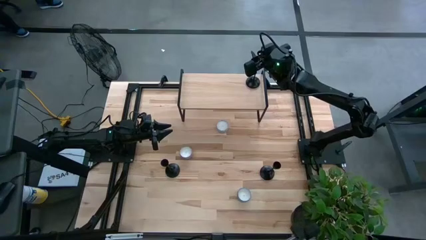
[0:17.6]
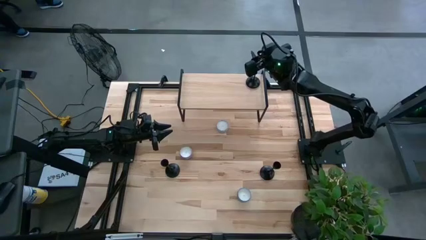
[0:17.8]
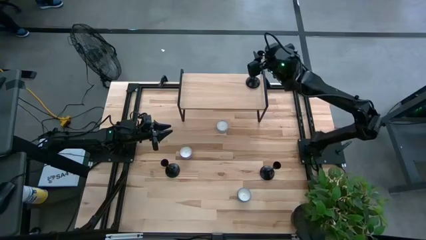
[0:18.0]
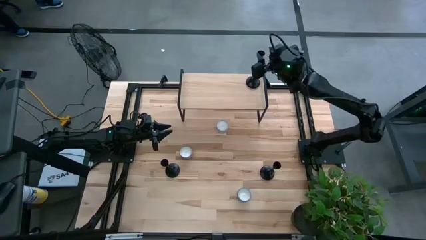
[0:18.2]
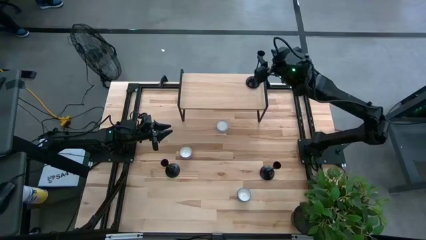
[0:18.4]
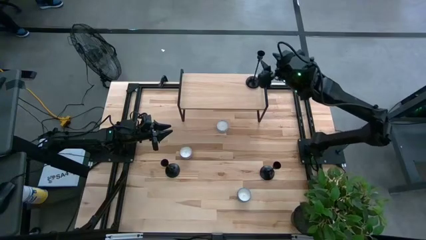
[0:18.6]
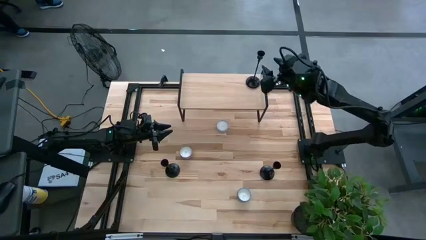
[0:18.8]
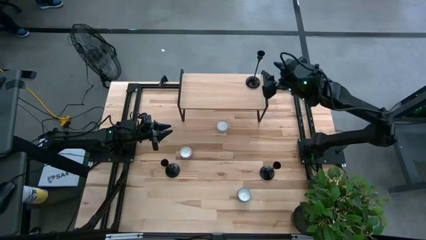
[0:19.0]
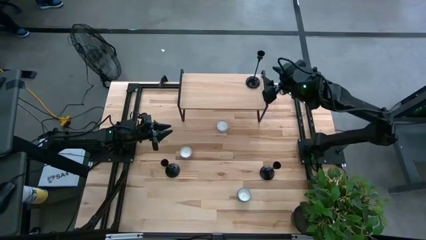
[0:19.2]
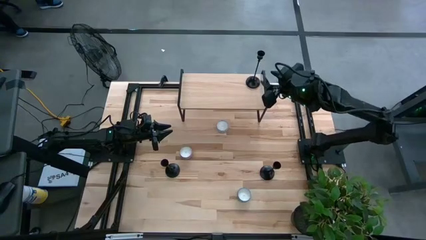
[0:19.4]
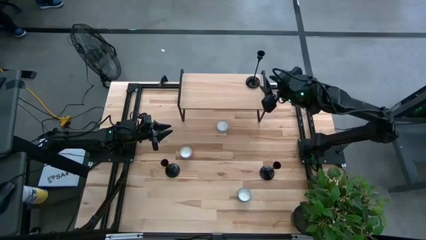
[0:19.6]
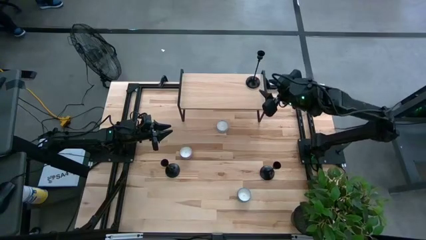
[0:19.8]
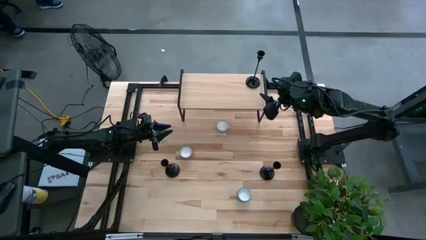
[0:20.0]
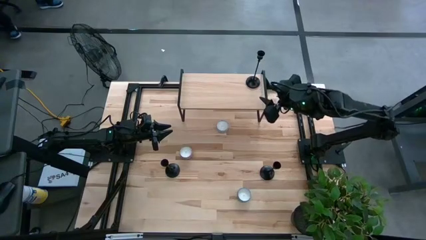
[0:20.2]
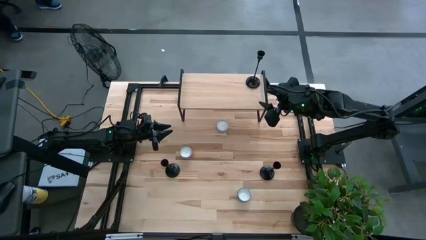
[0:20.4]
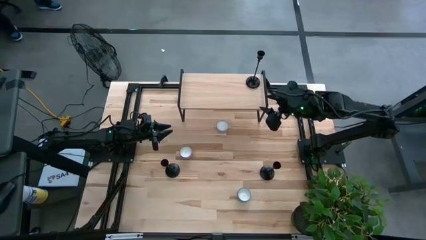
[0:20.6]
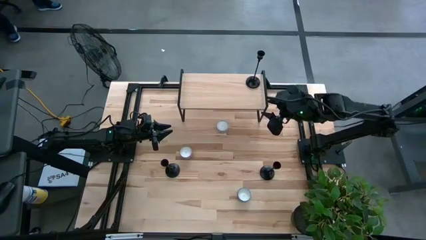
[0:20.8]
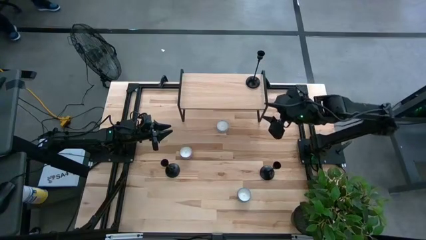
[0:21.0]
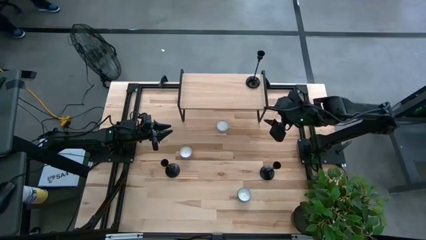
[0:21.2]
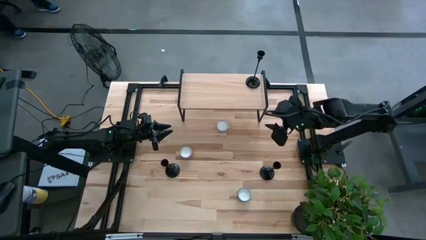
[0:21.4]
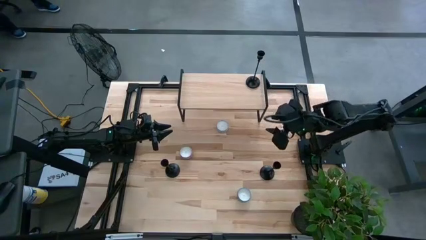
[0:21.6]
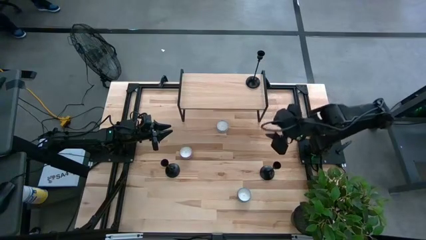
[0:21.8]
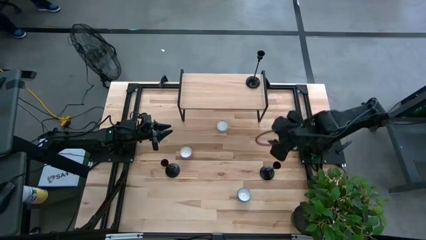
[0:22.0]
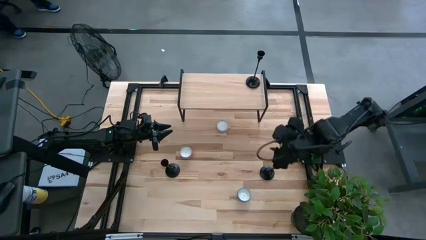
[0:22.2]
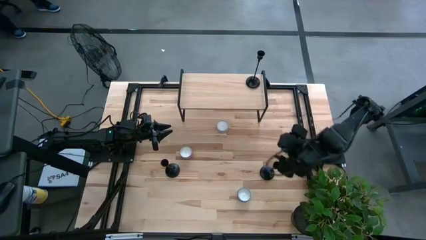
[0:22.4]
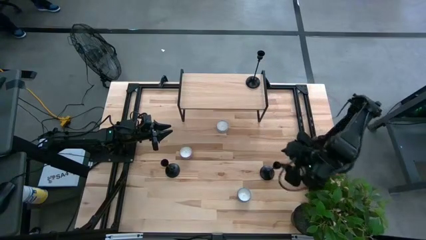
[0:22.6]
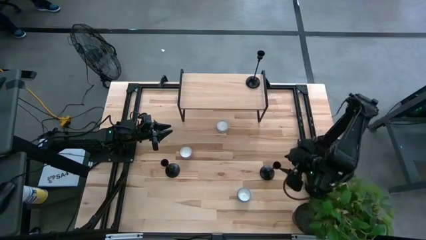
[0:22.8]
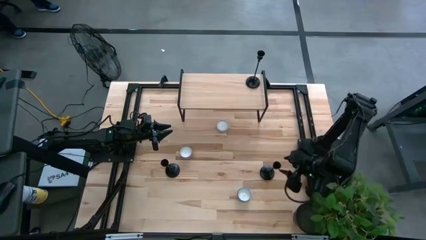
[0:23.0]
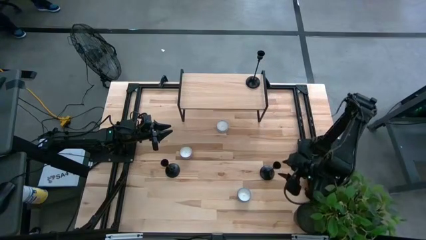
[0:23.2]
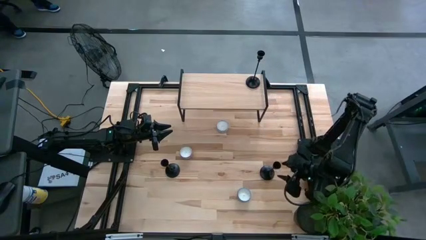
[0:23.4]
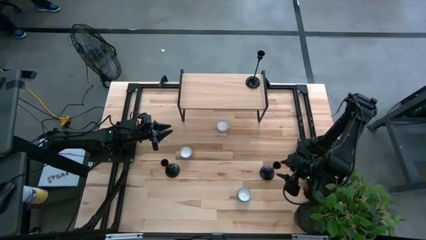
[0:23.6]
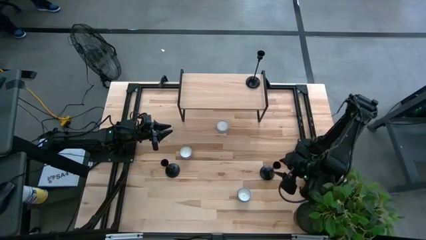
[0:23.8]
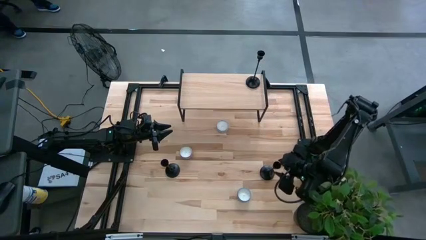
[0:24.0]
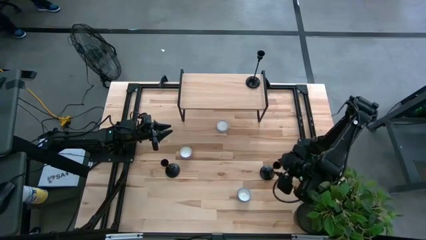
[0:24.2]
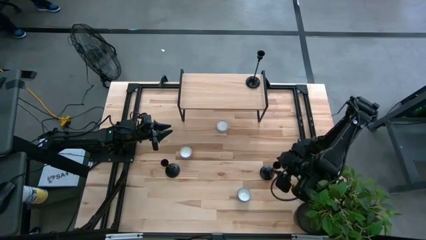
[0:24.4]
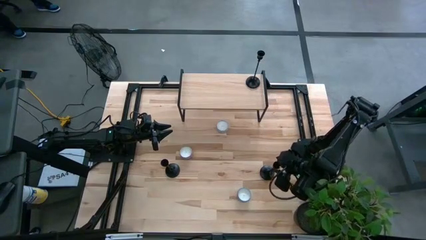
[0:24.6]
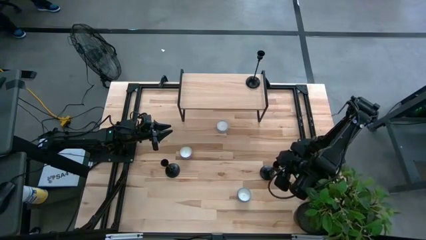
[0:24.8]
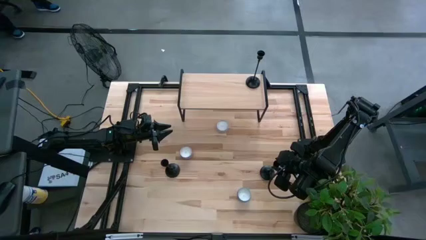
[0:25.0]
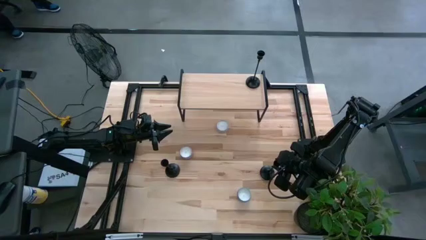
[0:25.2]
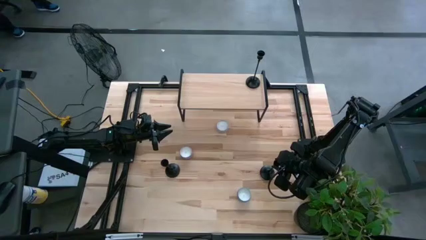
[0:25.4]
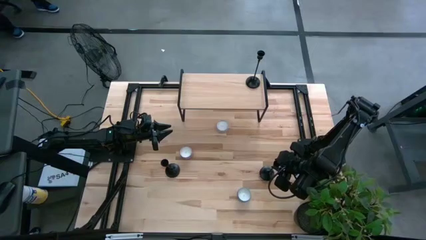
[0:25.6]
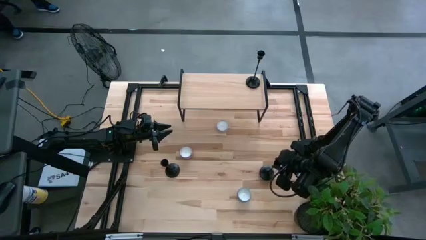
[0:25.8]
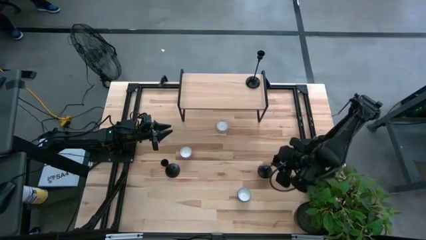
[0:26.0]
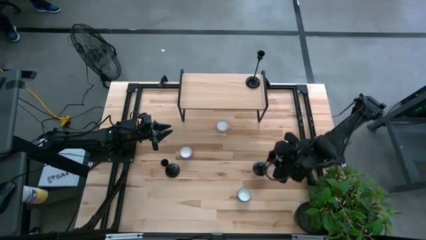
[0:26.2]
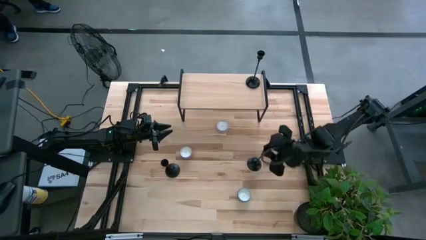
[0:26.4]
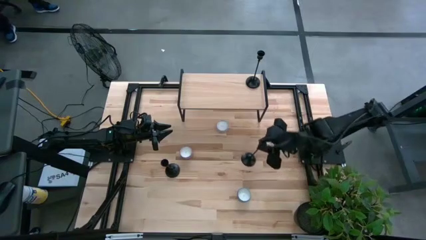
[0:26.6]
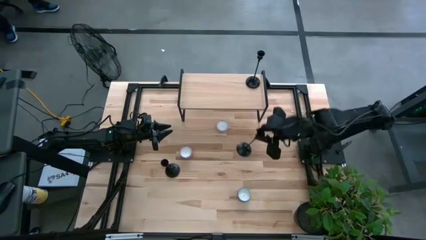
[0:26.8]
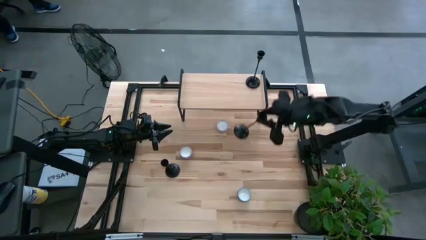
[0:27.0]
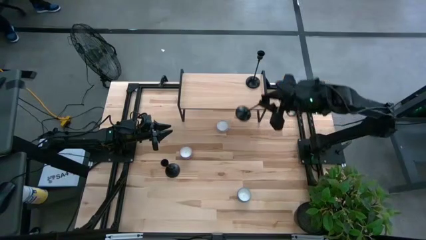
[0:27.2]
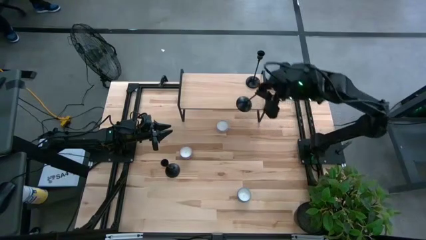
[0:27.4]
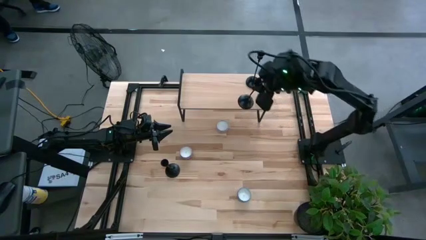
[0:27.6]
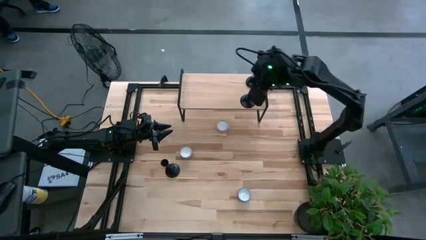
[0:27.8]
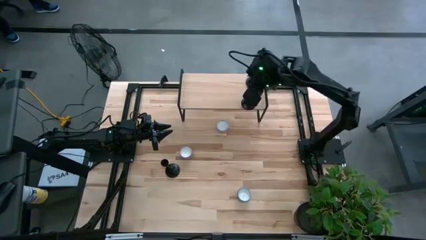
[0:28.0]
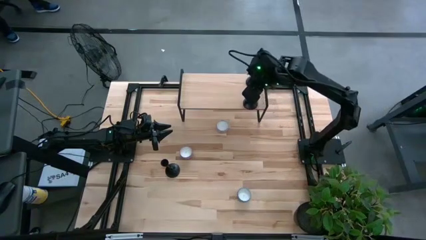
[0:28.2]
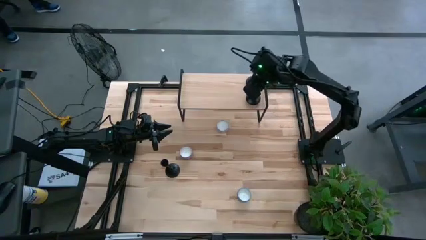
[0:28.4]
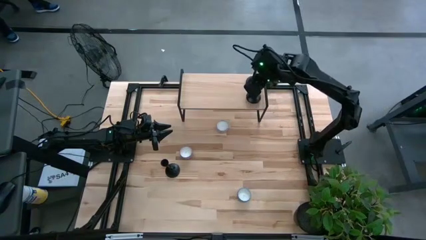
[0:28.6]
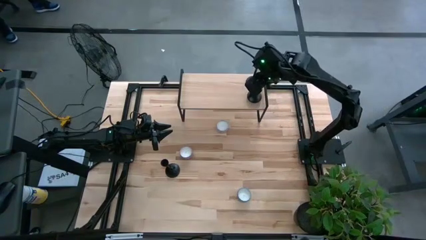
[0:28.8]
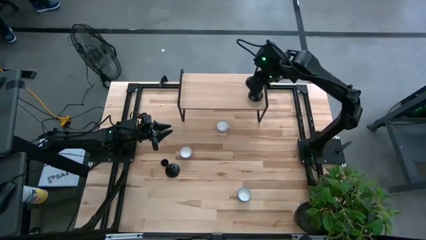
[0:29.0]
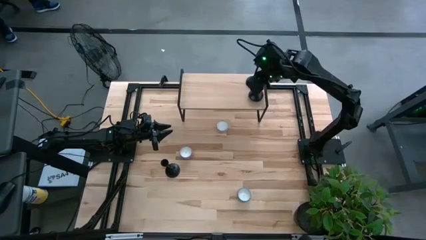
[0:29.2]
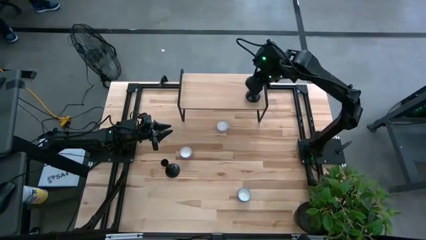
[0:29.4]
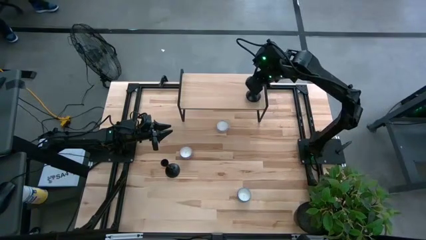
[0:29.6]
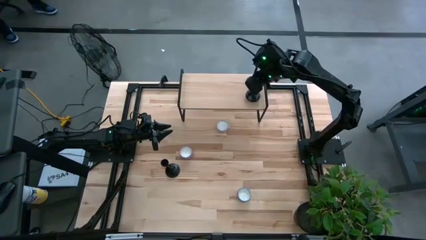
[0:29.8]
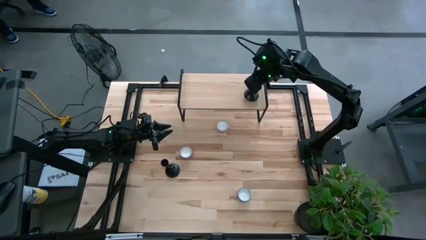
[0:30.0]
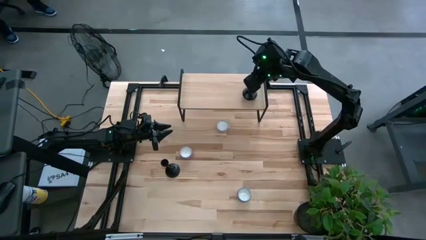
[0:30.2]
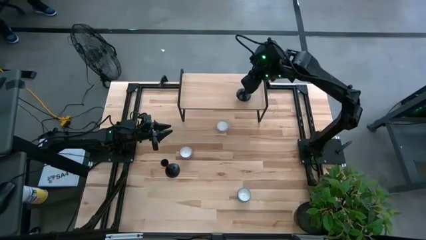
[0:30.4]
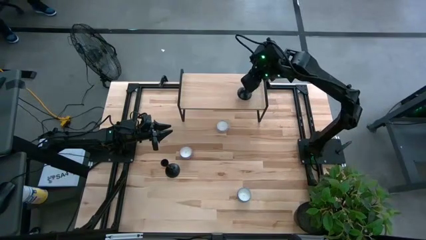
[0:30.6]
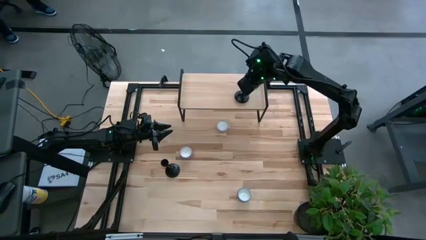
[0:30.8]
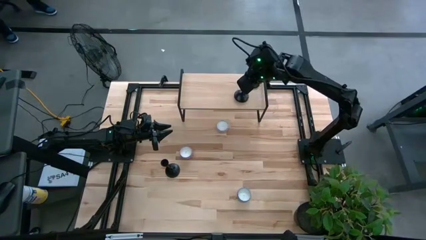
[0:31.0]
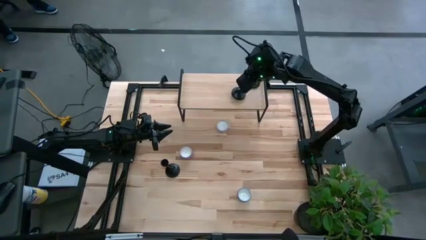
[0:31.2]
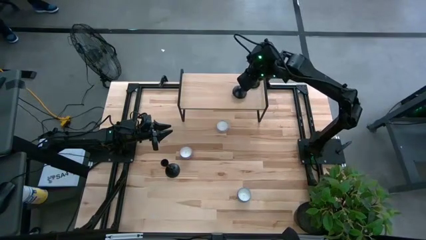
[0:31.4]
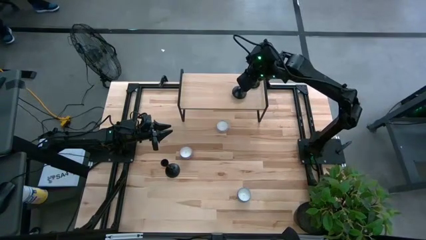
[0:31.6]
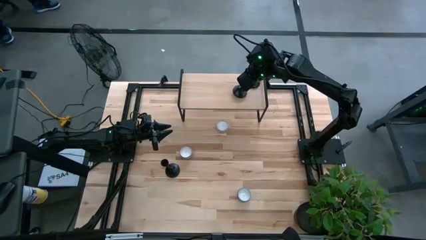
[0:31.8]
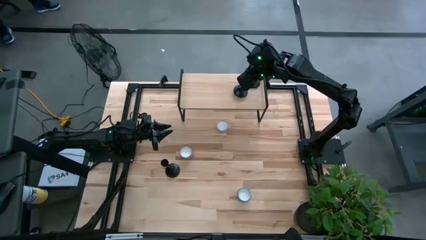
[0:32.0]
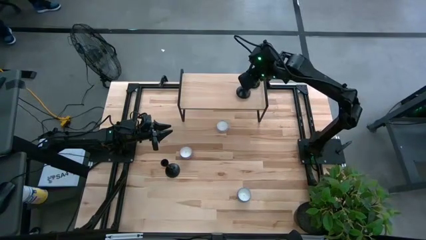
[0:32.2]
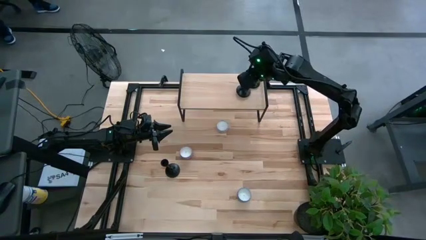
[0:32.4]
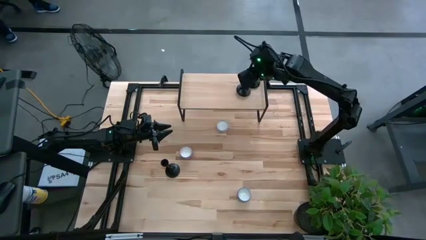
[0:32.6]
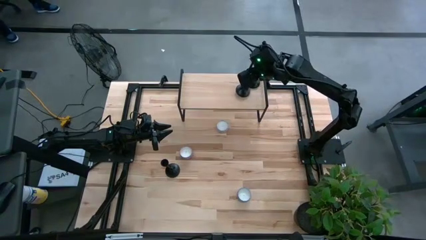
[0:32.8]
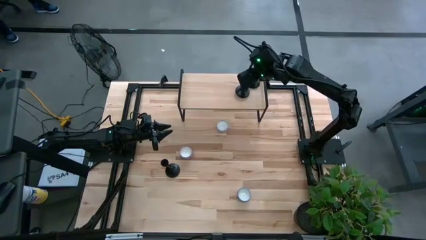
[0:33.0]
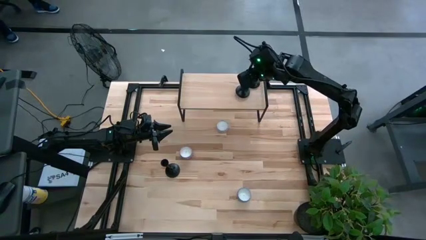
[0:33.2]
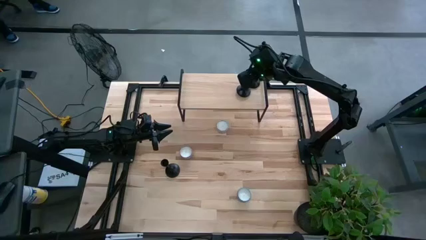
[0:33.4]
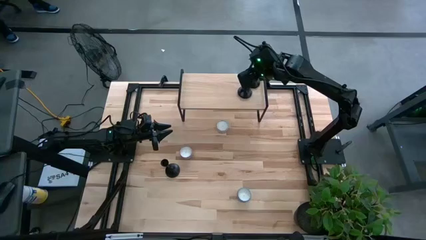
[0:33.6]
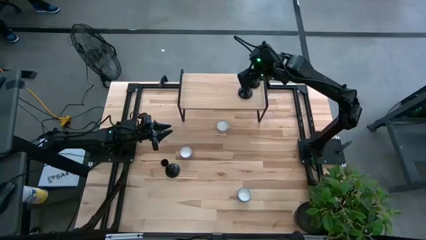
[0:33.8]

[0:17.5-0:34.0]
Task: Pick & Place candle stick holders
Put the right black candle holder on the shelf
